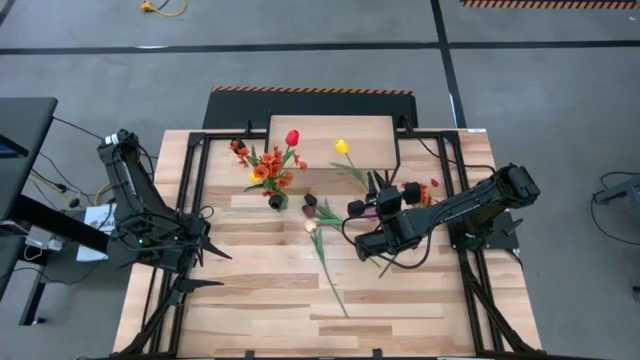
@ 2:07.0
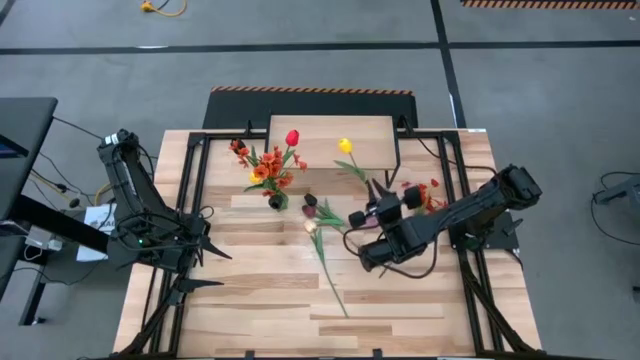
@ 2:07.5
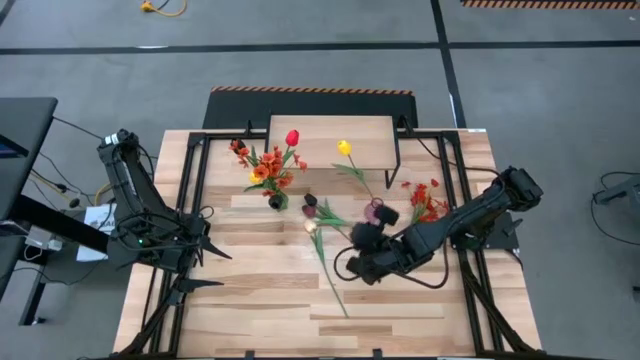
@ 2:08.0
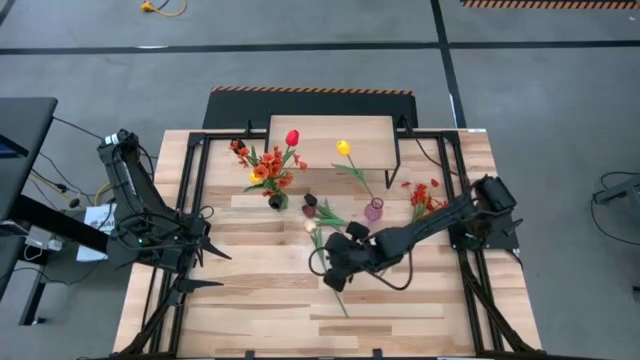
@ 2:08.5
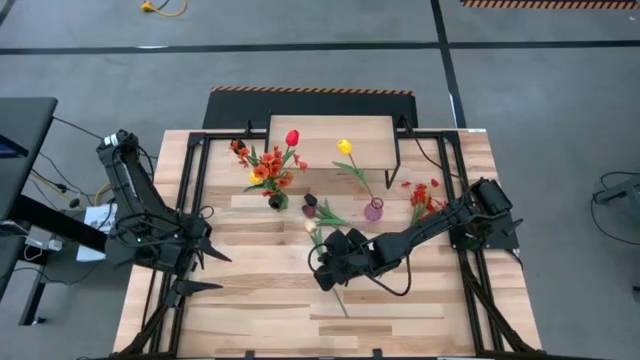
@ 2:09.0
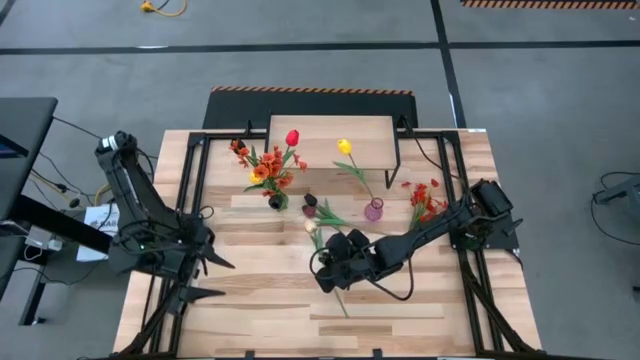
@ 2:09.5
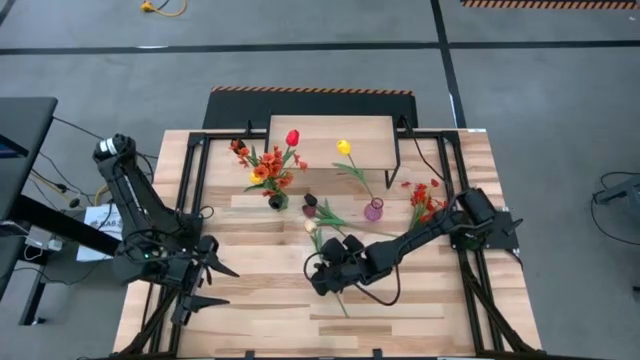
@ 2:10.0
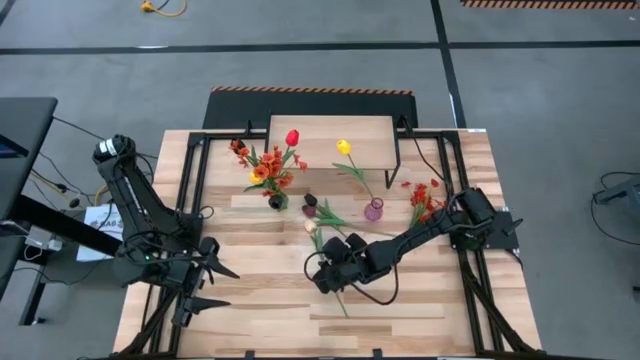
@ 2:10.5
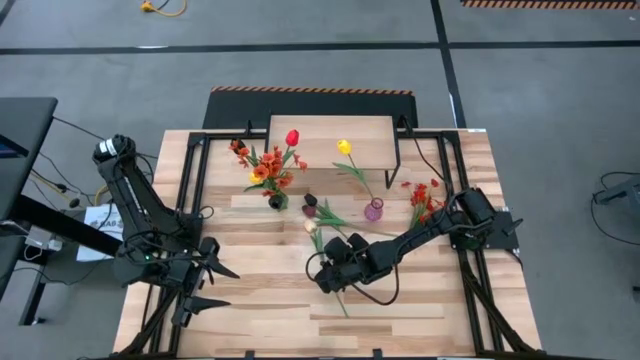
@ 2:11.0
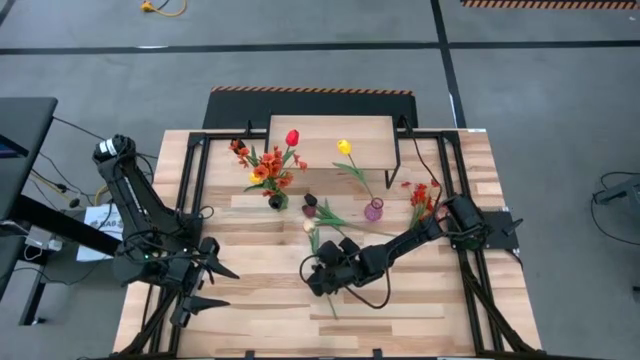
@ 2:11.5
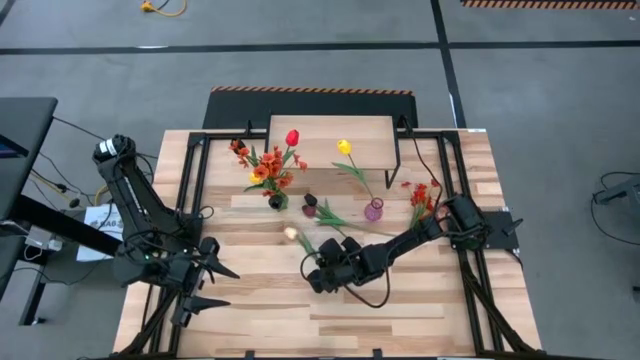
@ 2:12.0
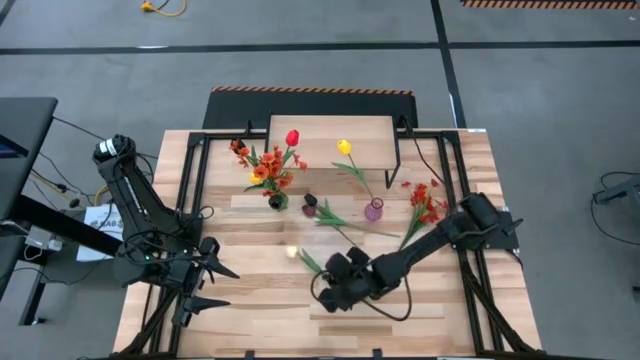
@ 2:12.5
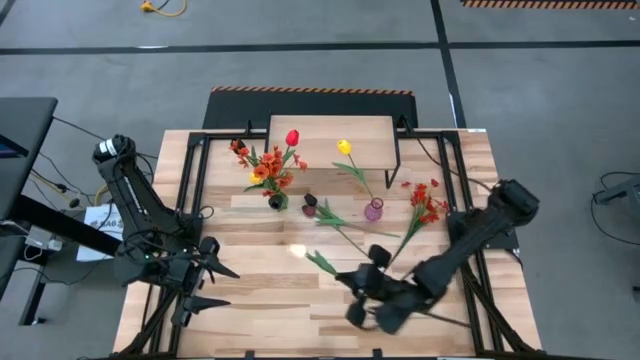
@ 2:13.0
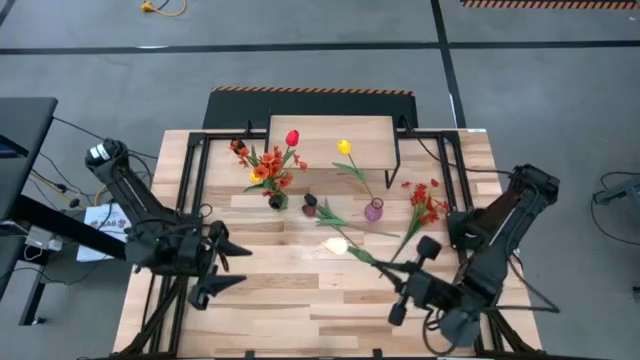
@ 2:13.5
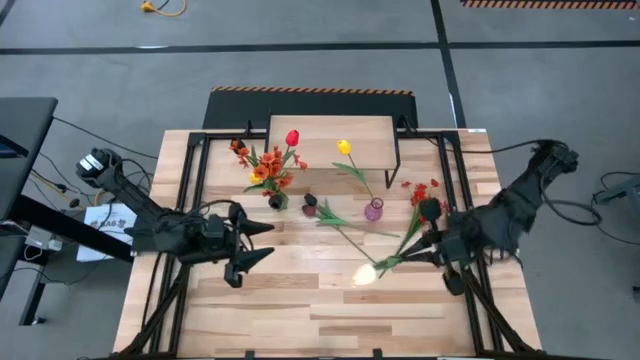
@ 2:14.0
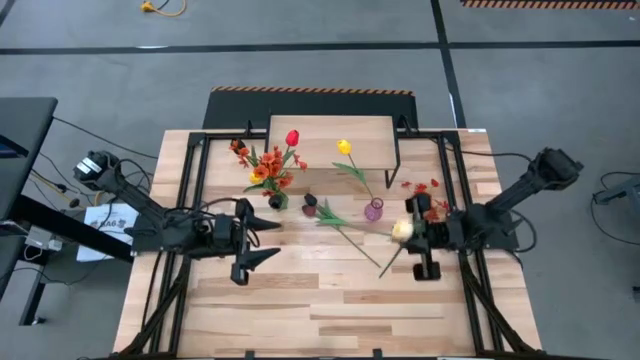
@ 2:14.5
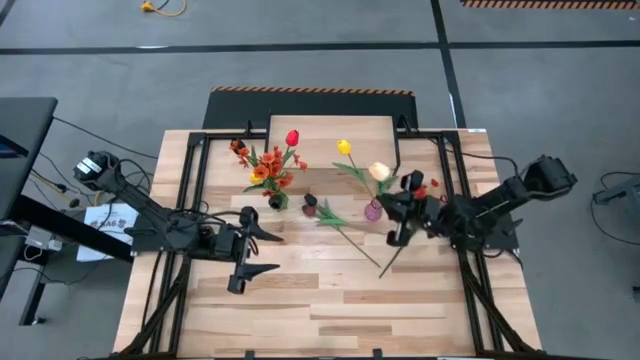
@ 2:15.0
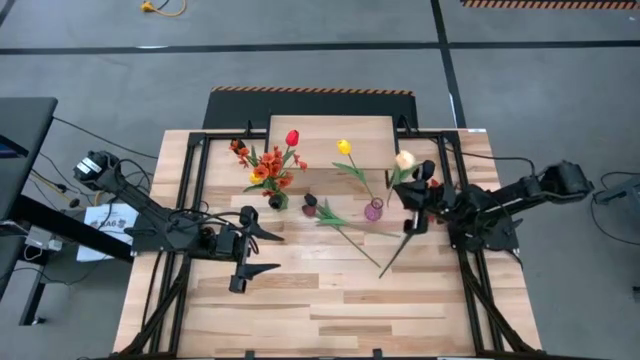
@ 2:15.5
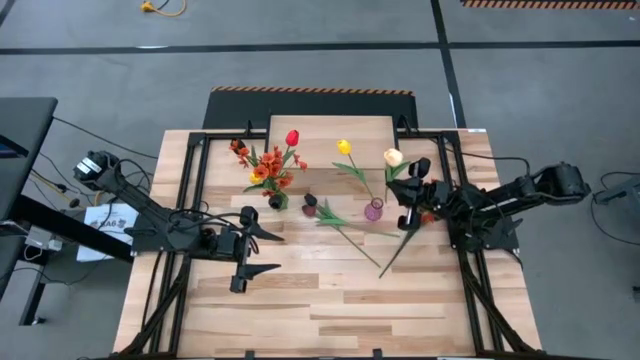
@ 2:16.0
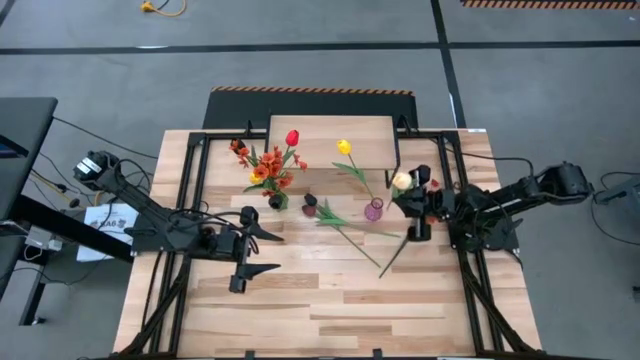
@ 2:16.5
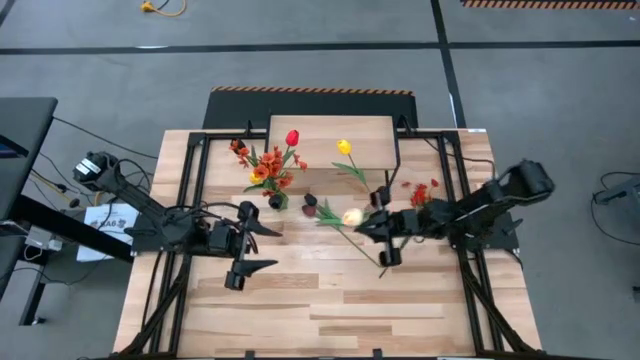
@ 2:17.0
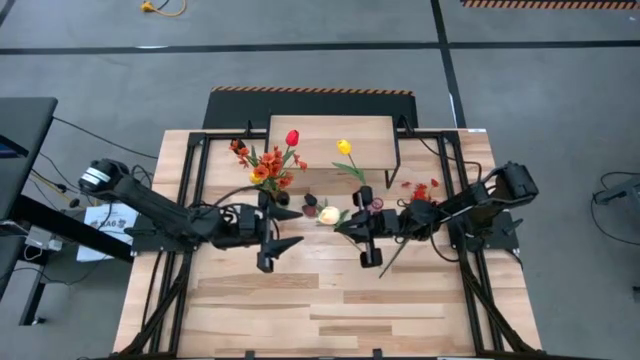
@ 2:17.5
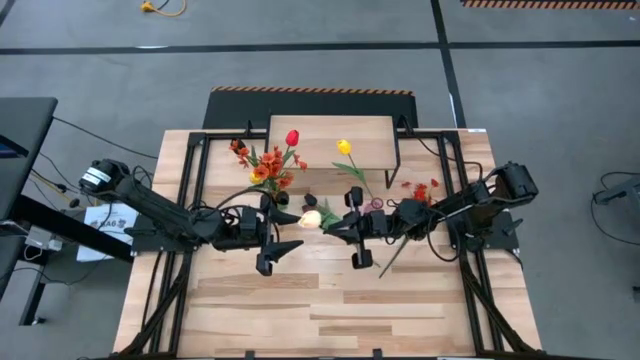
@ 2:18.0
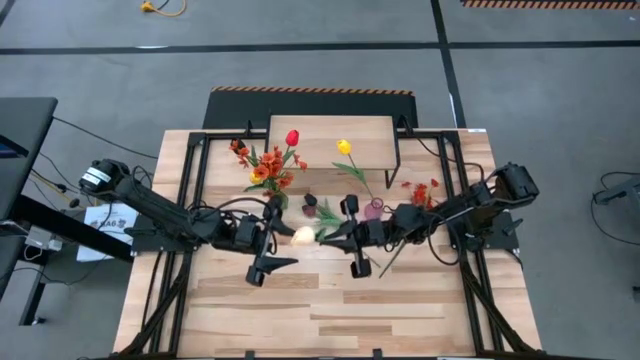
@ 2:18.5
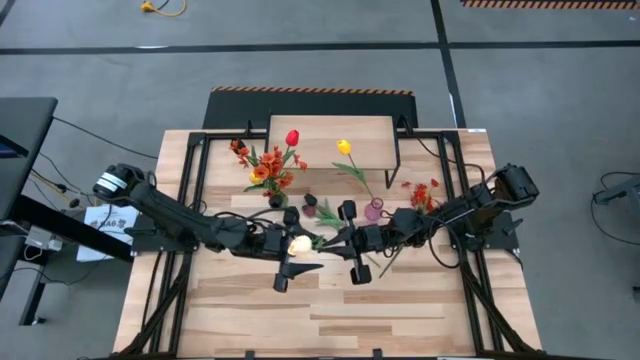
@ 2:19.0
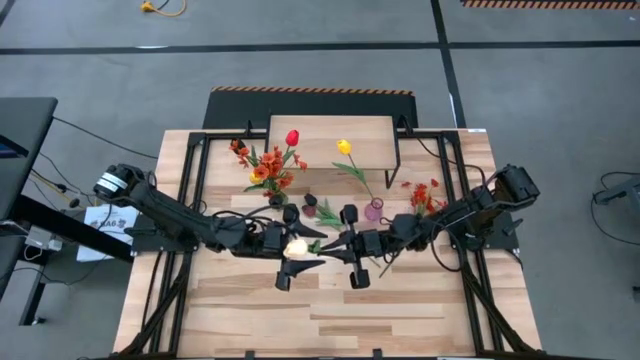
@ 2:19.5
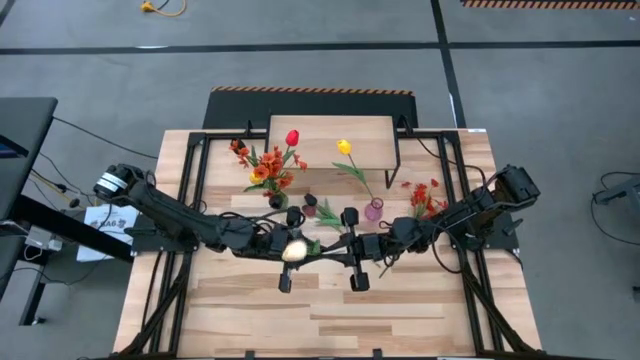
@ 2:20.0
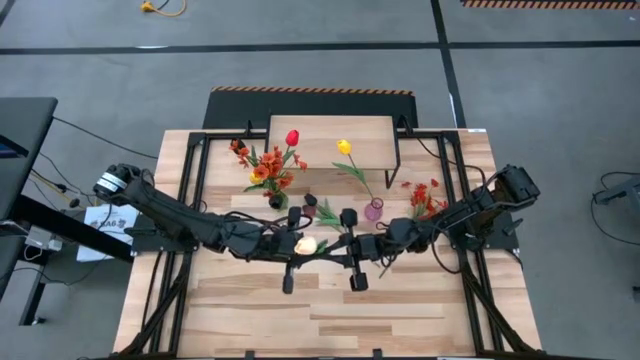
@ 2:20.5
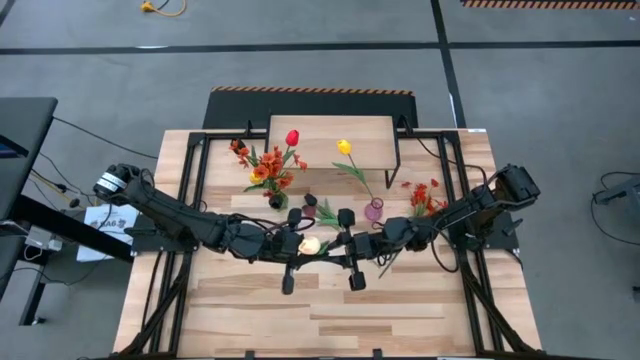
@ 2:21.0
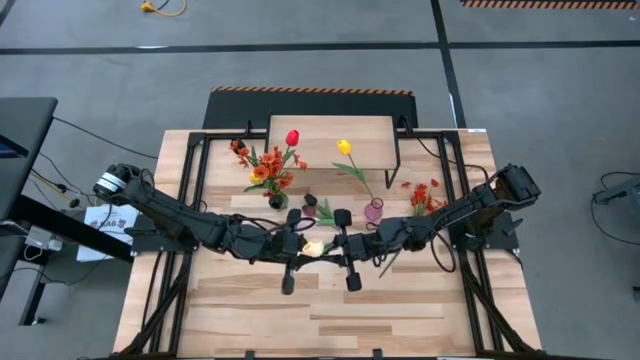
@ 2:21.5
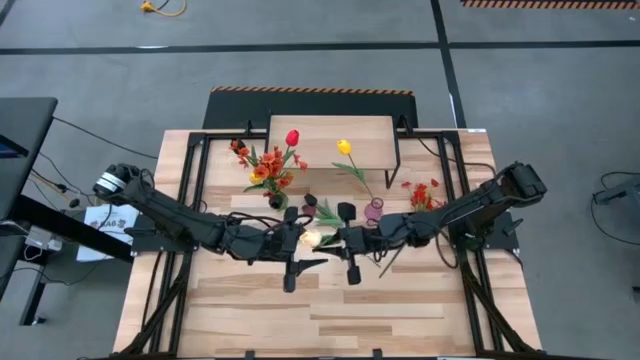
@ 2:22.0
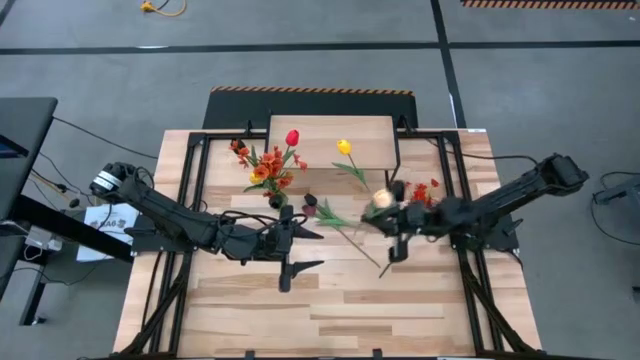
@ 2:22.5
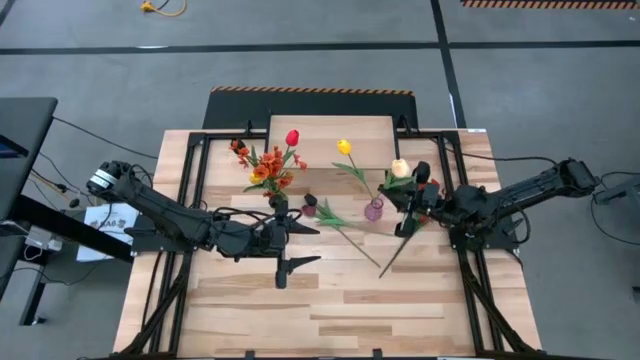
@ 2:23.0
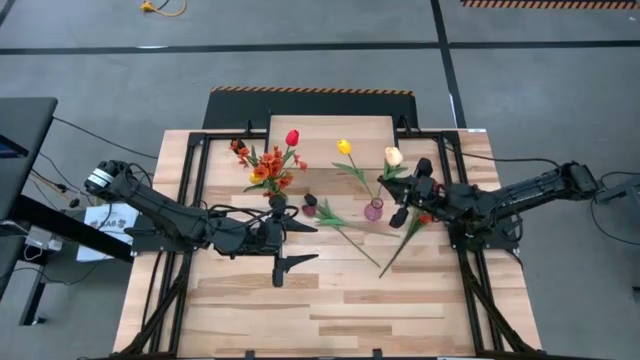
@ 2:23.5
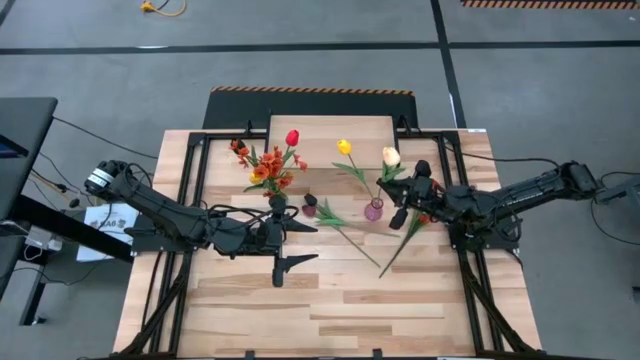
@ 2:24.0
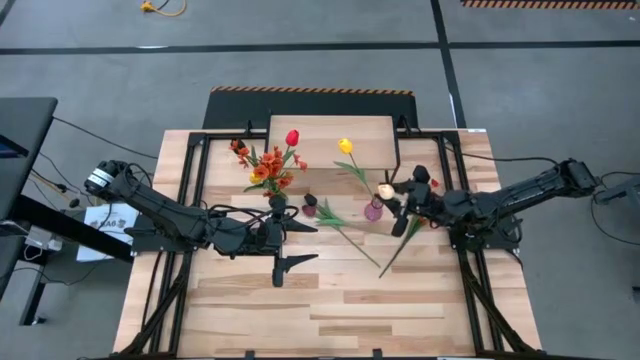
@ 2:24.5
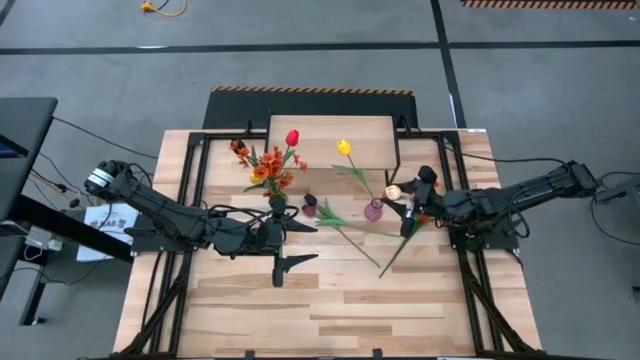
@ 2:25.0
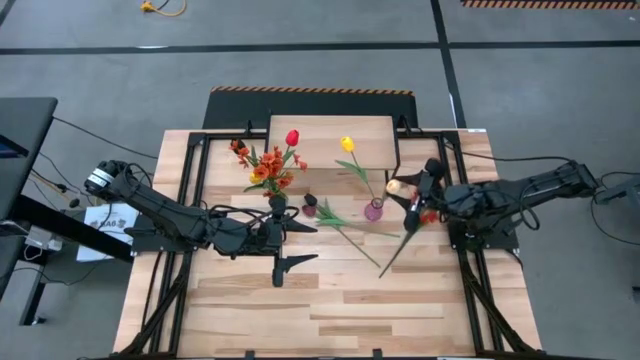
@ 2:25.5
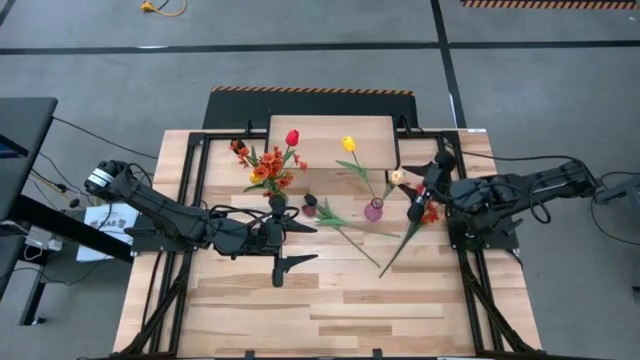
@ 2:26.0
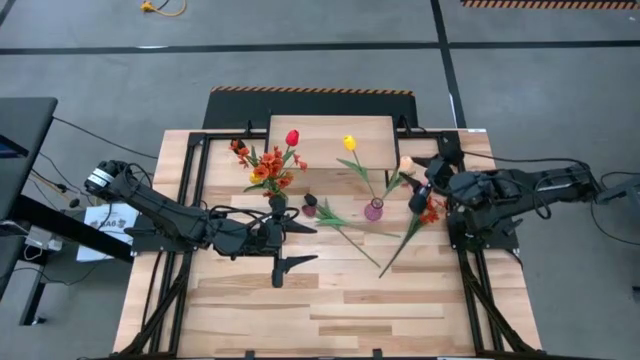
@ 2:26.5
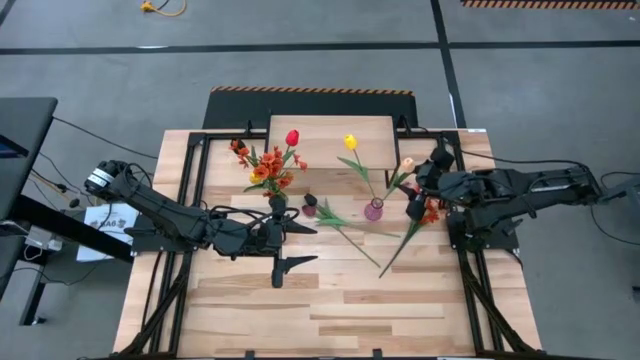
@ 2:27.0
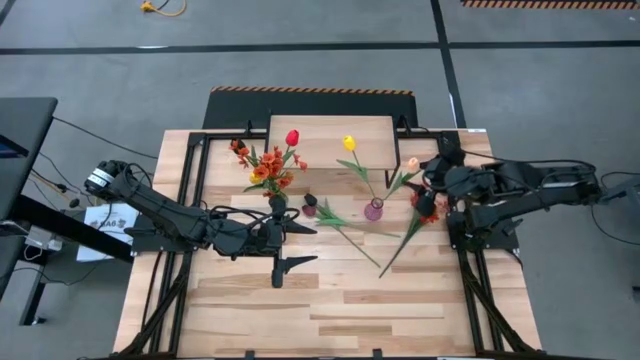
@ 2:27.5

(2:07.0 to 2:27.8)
Task: Pick and place flowers into a vace then onto a shelf
Put the light orange tulip into the purple vase
